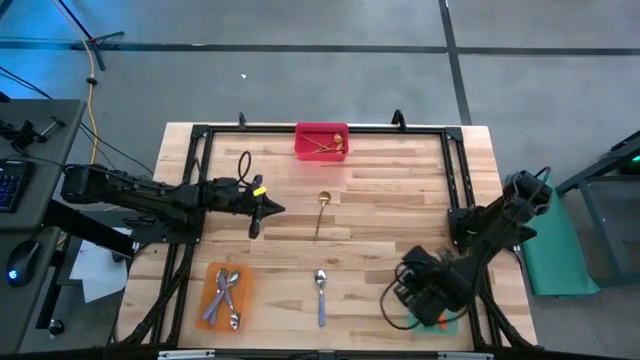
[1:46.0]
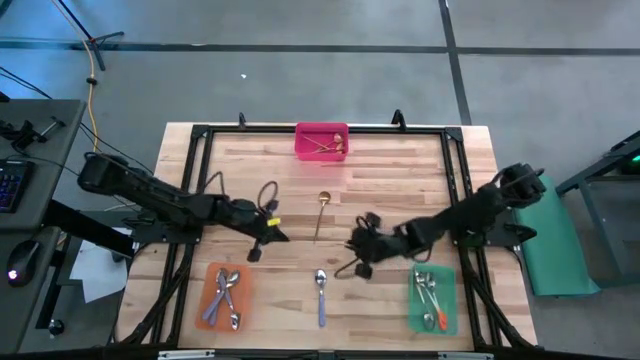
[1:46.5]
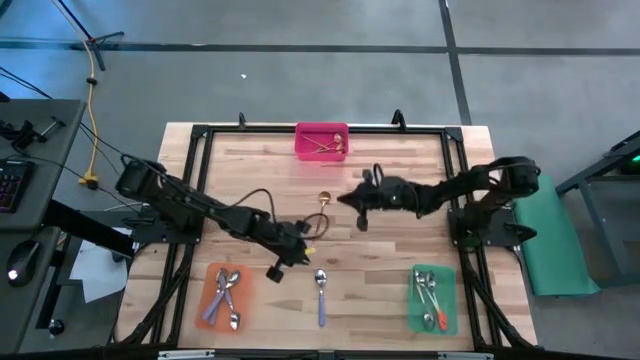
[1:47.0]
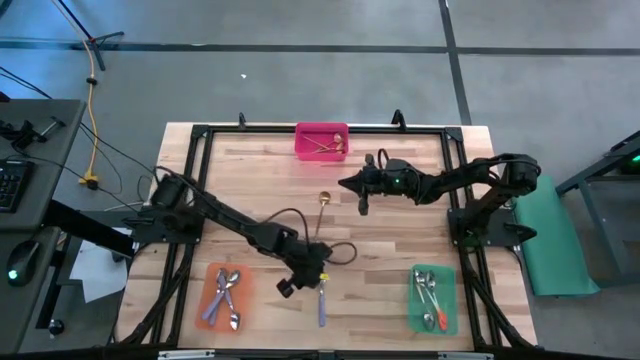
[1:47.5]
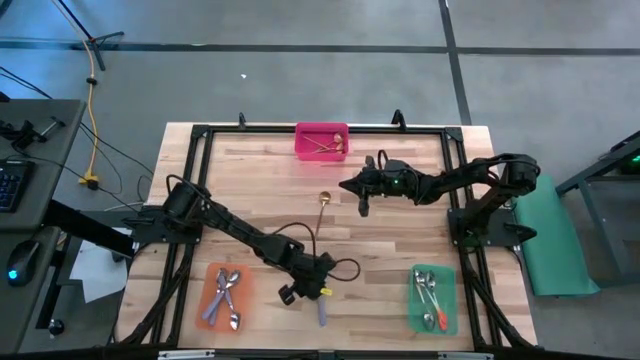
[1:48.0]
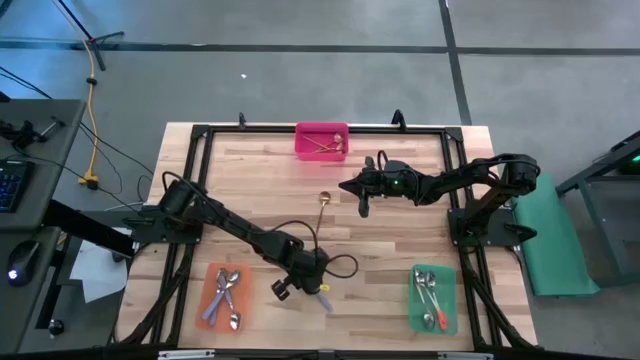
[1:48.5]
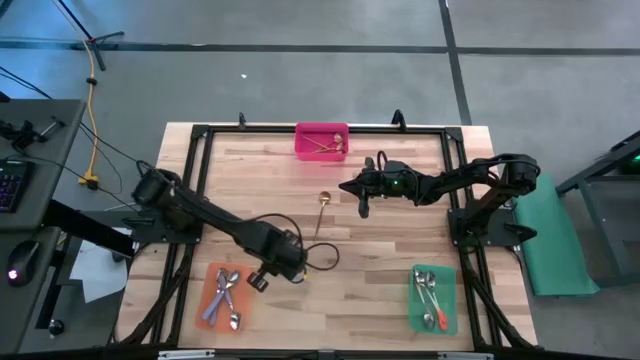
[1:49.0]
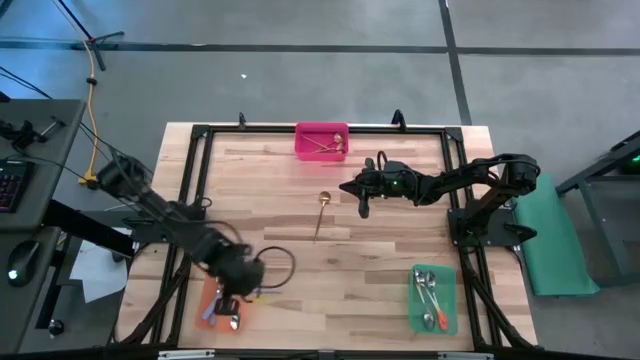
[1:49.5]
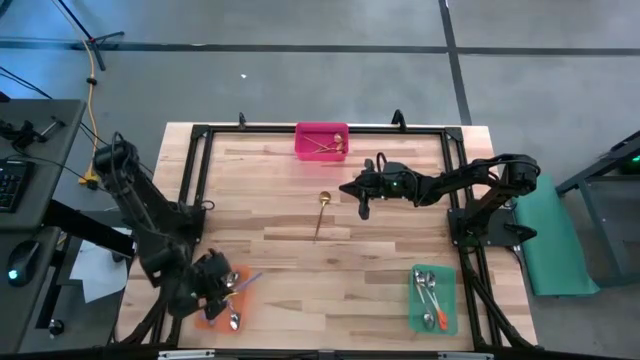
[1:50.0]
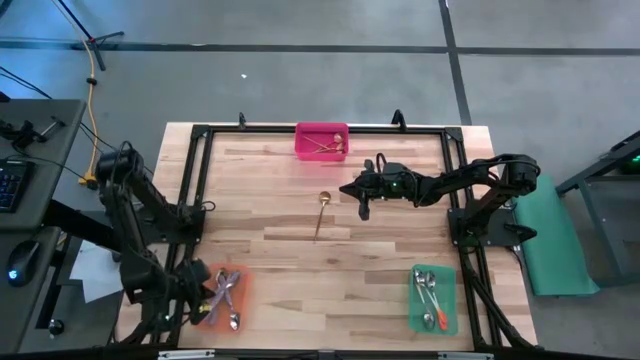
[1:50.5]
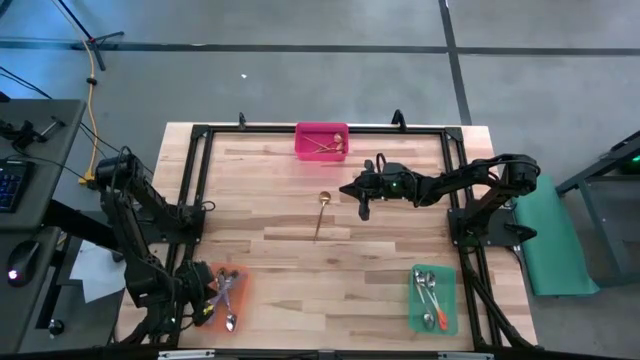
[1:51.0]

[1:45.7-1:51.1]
Task: Sort silverware by color (type)
Put the purple spoon into the orange bin

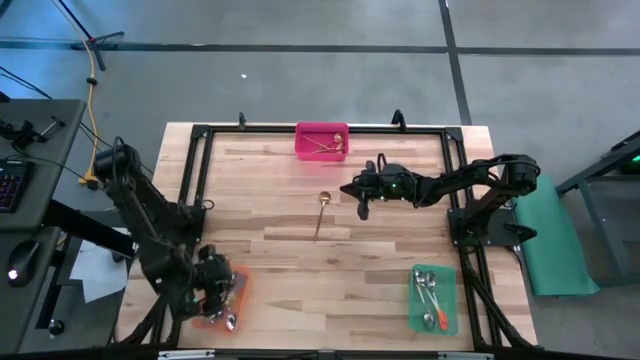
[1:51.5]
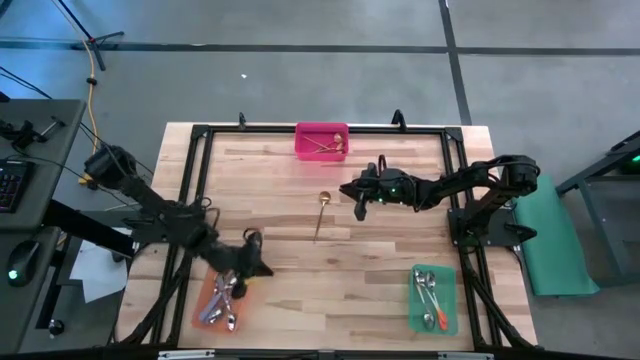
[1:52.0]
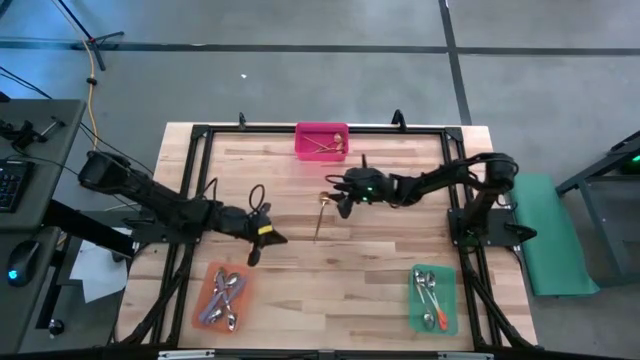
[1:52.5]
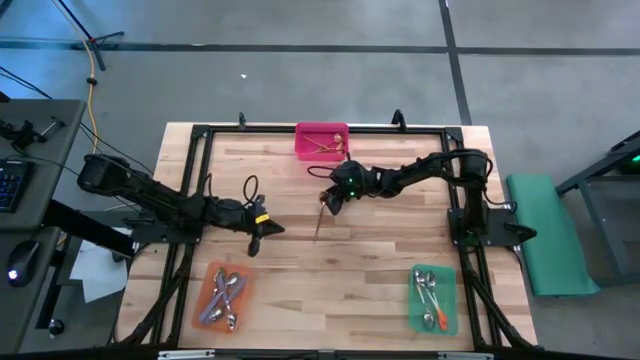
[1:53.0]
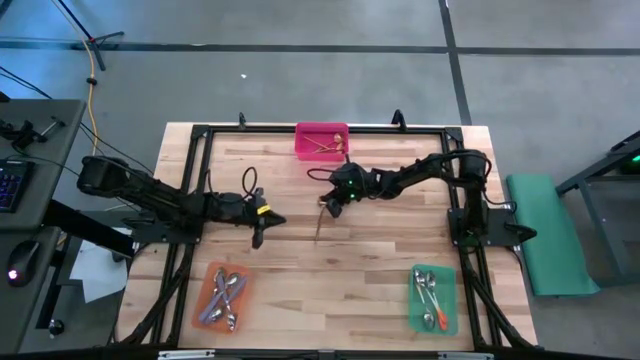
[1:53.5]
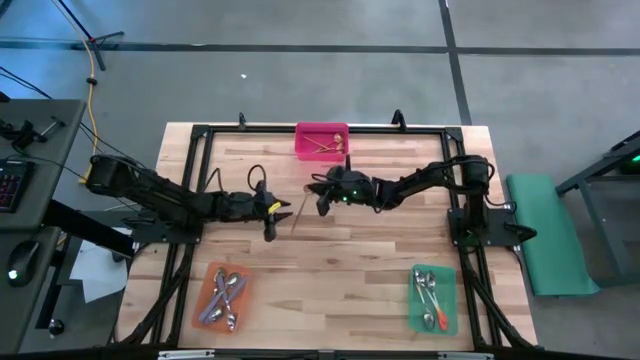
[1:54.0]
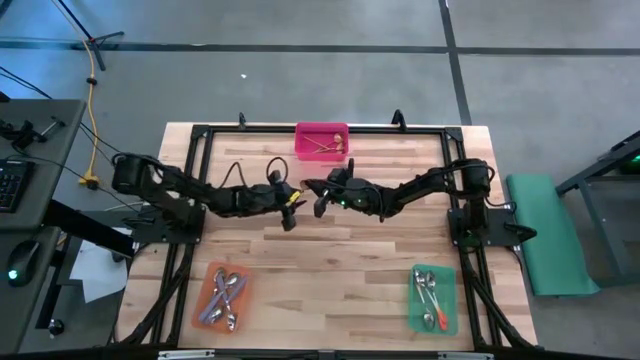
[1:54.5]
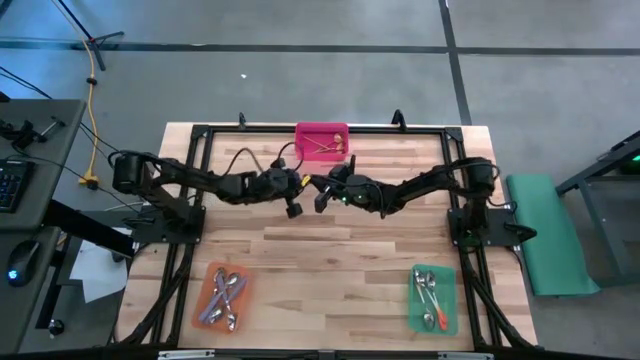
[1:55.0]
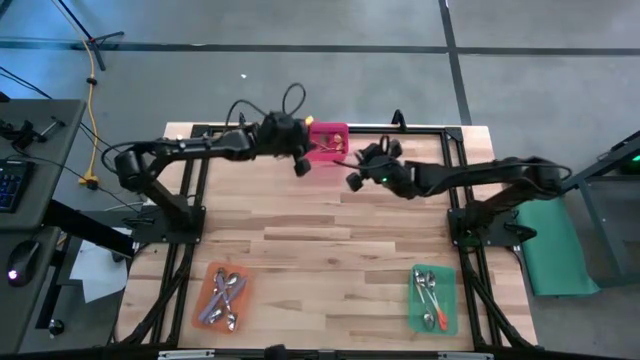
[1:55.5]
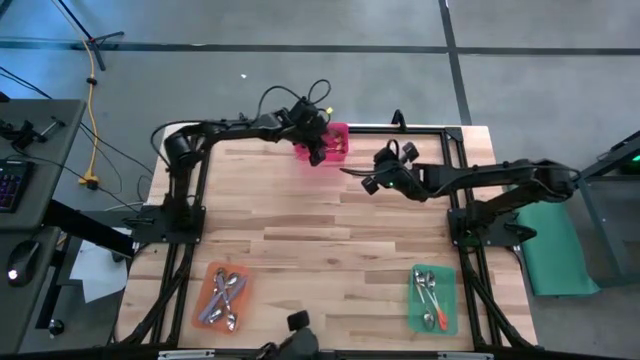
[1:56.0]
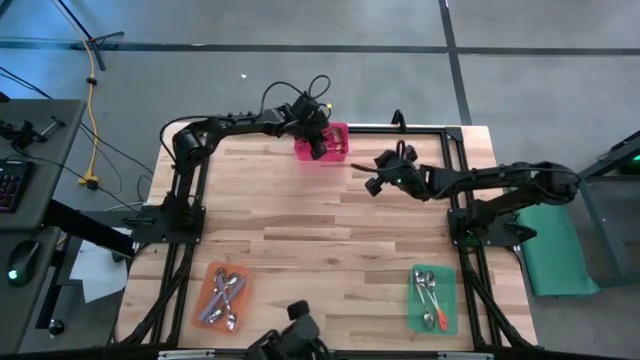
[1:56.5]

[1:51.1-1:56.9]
Put the gold spoon into the red bin

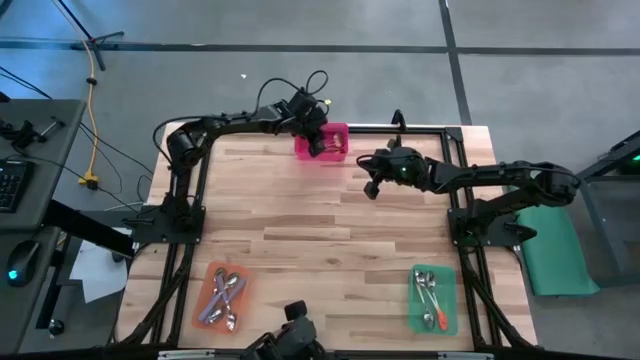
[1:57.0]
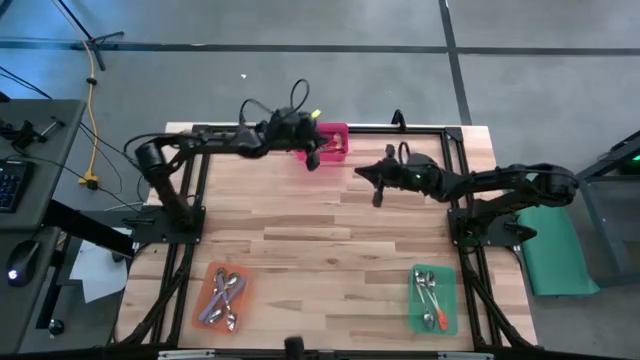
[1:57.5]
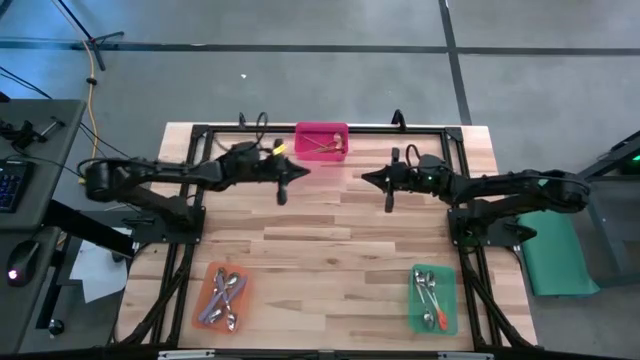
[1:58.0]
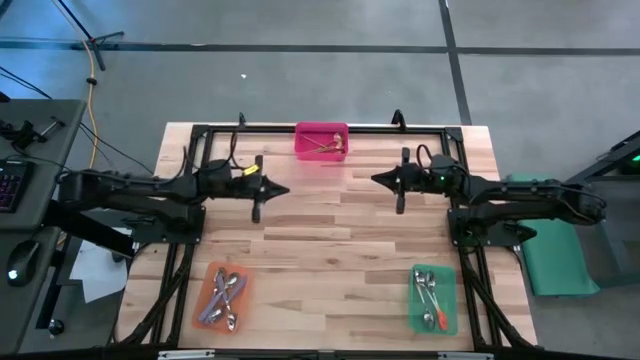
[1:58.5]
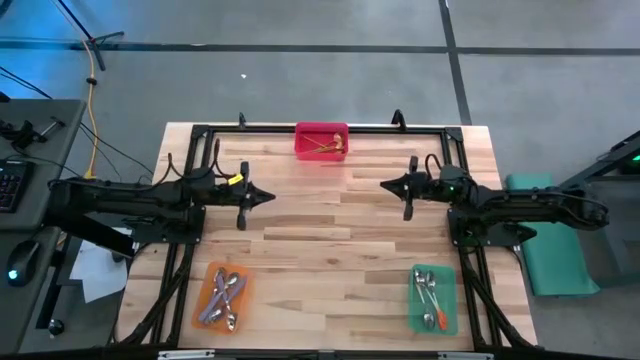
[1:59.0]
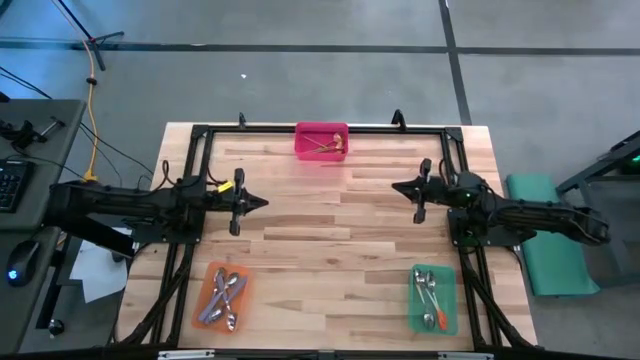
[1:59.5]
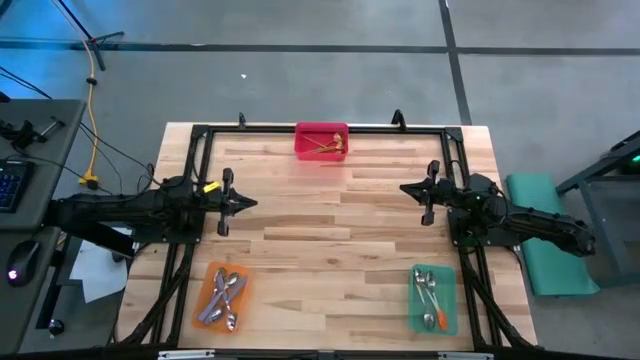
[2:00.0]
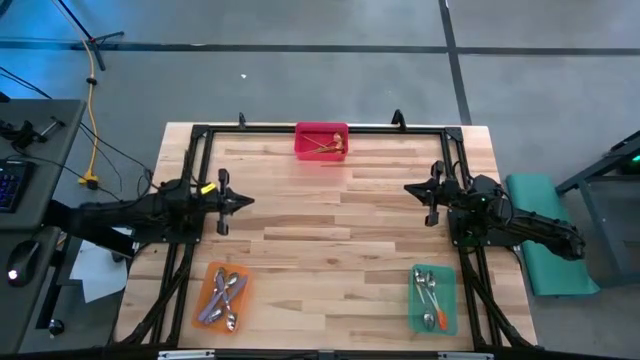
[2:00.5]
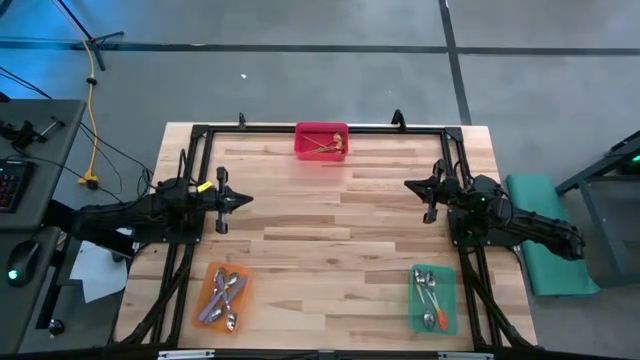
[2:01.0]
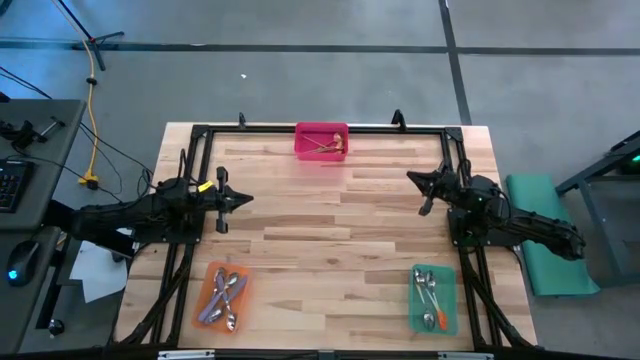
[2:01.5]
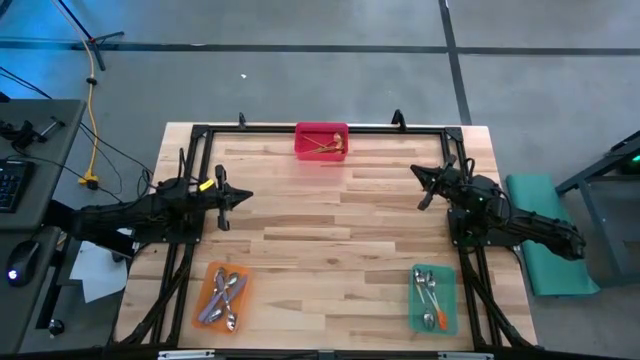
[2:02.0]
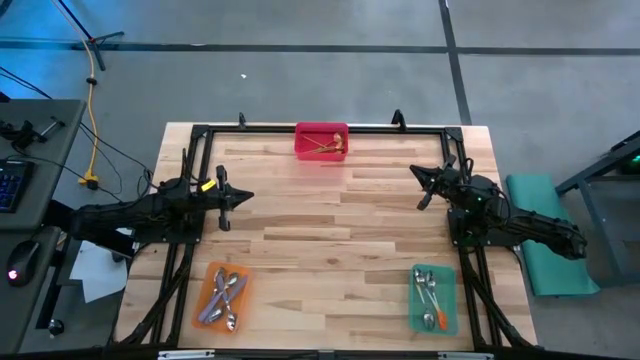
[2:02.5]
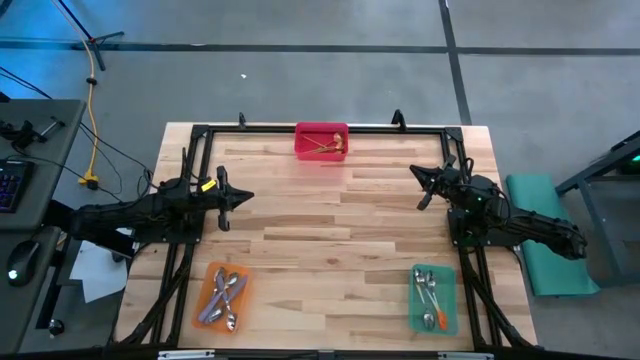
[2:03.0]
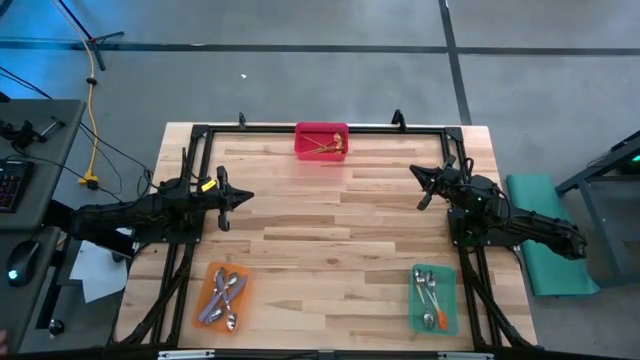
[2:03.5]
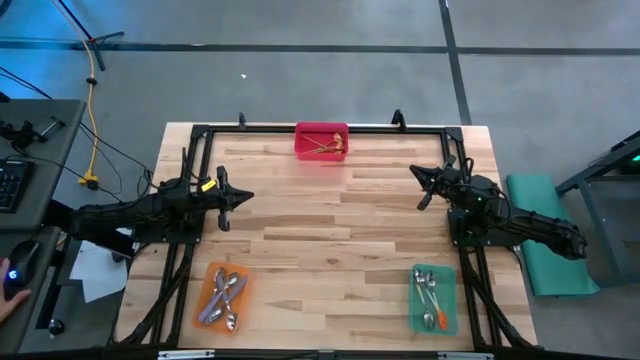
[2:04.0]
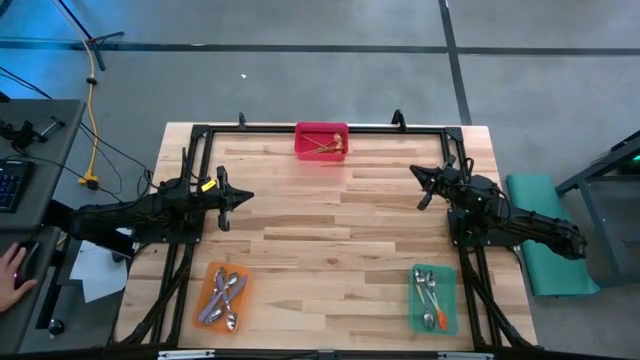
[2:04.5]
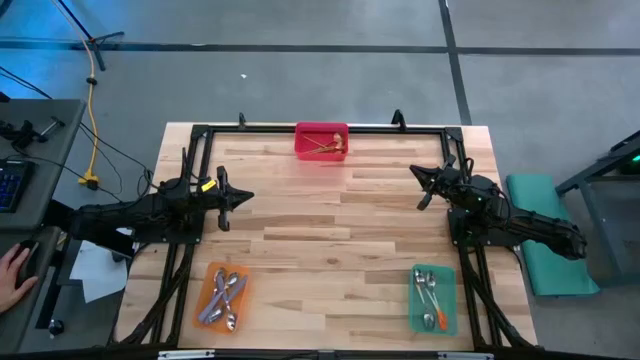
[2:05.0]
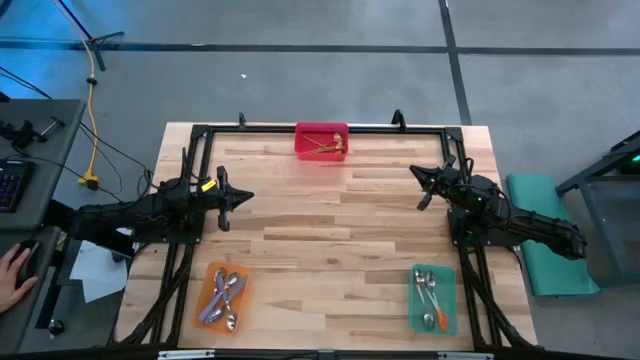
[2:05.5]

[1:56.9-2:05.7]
Return to Home Position
